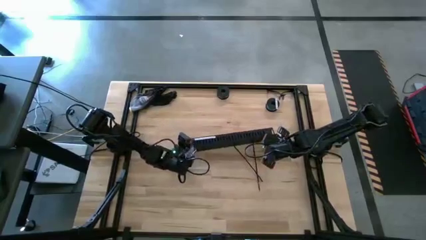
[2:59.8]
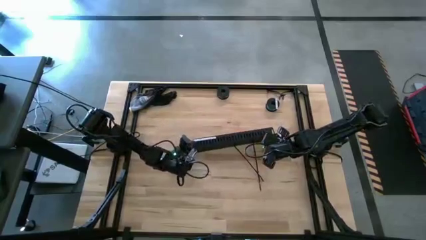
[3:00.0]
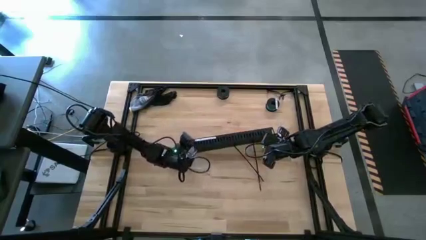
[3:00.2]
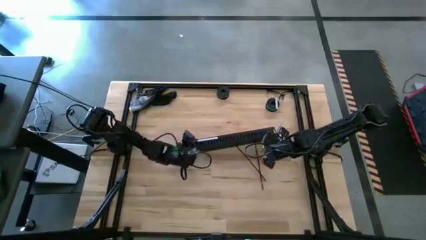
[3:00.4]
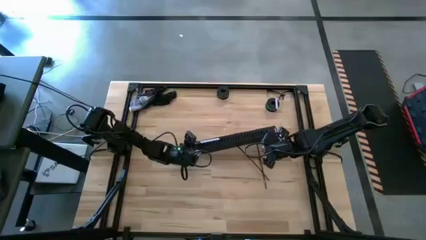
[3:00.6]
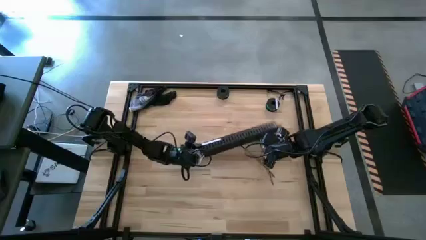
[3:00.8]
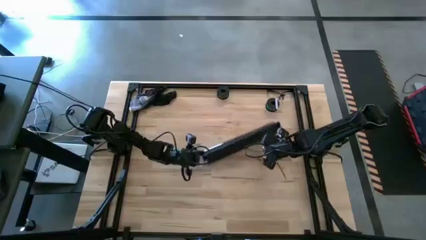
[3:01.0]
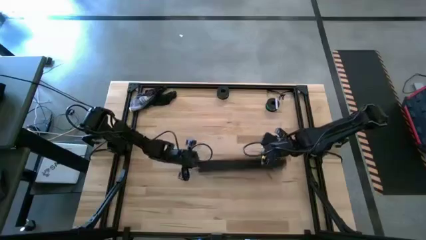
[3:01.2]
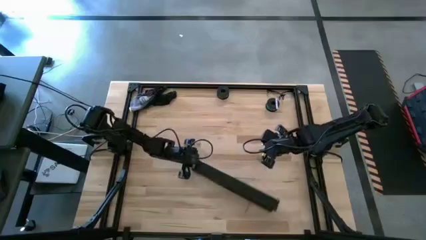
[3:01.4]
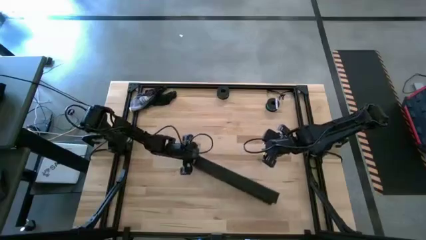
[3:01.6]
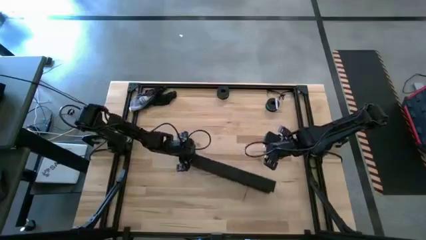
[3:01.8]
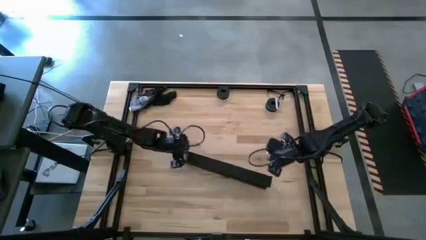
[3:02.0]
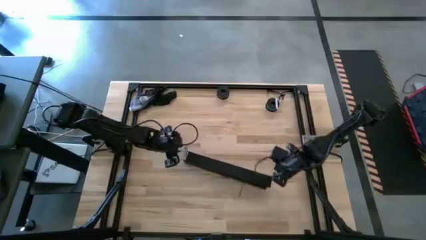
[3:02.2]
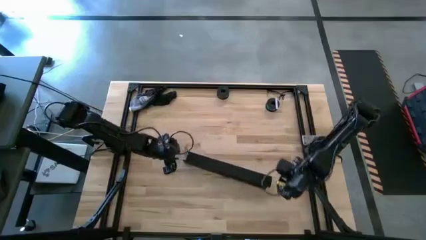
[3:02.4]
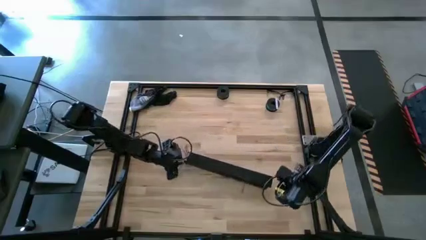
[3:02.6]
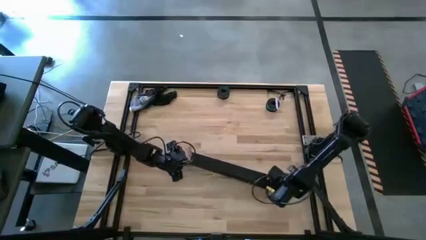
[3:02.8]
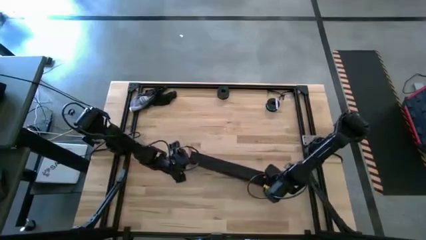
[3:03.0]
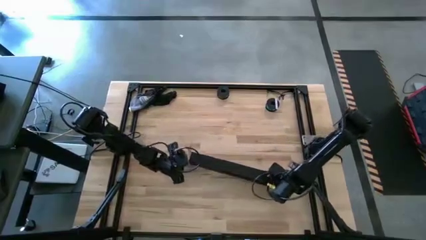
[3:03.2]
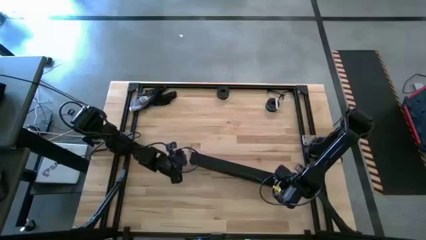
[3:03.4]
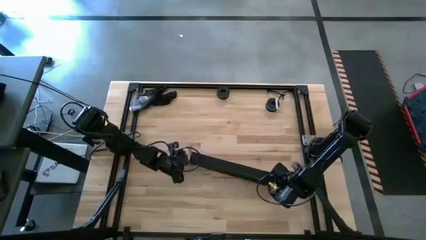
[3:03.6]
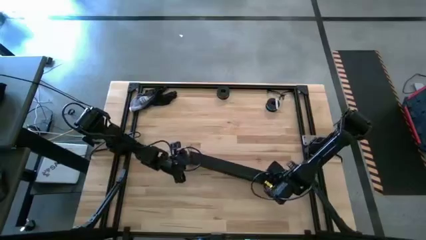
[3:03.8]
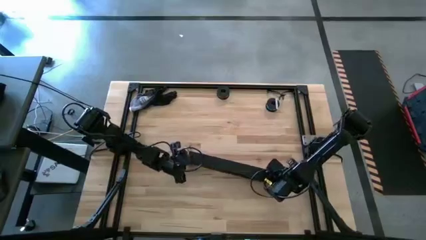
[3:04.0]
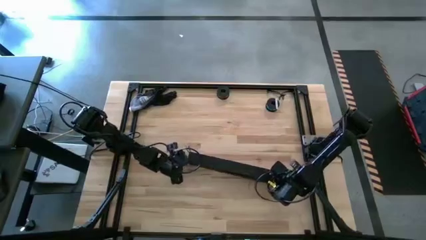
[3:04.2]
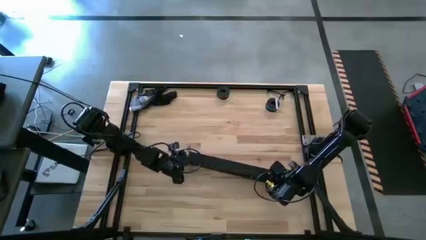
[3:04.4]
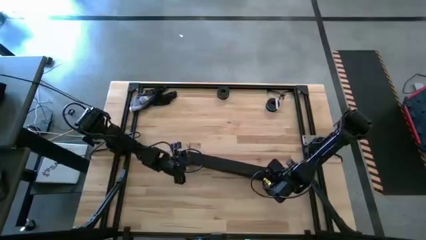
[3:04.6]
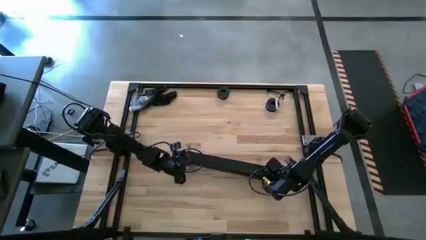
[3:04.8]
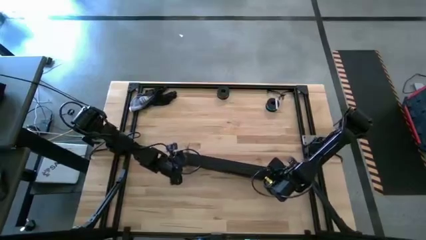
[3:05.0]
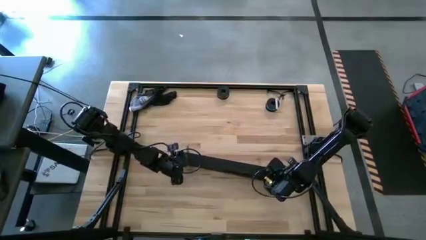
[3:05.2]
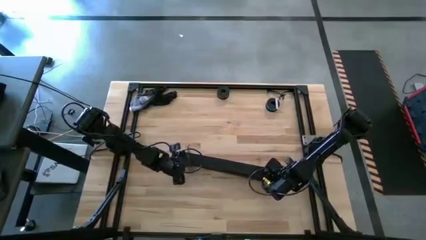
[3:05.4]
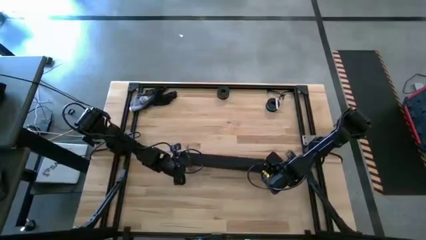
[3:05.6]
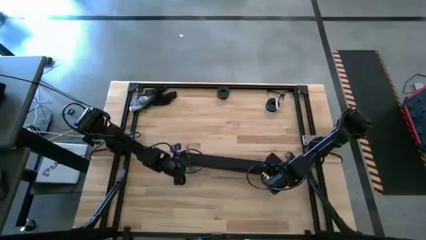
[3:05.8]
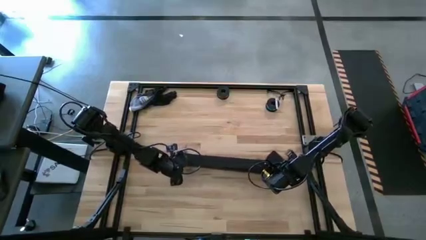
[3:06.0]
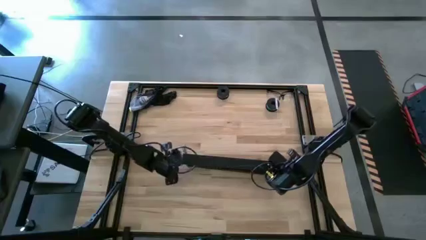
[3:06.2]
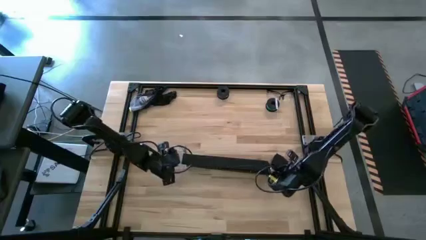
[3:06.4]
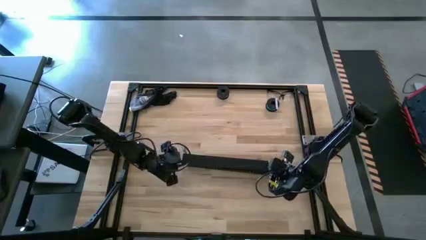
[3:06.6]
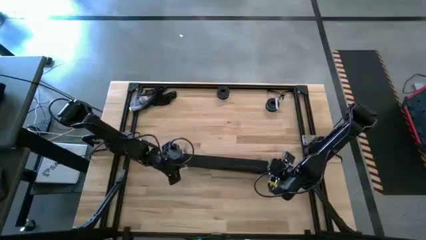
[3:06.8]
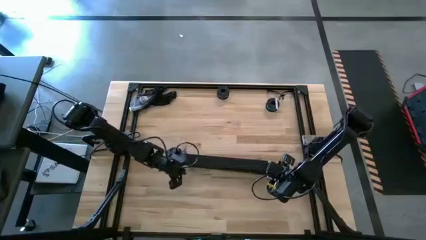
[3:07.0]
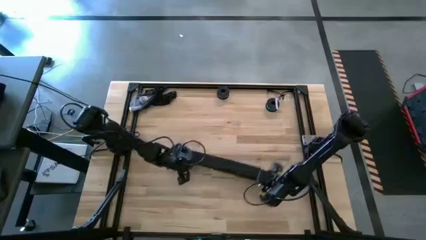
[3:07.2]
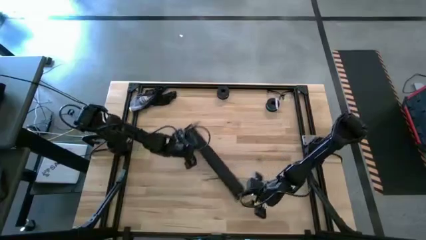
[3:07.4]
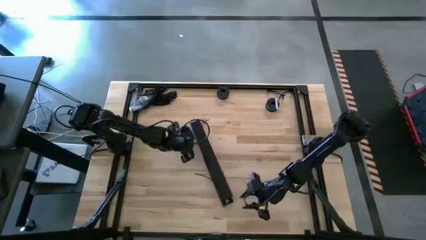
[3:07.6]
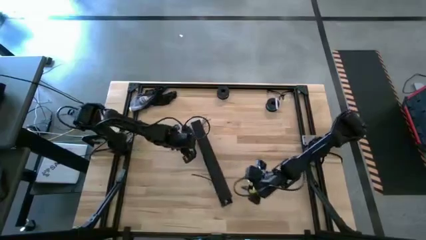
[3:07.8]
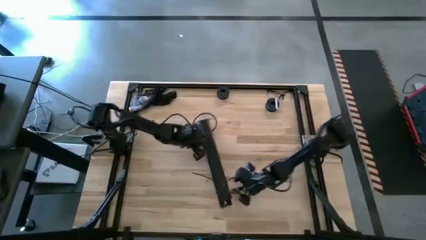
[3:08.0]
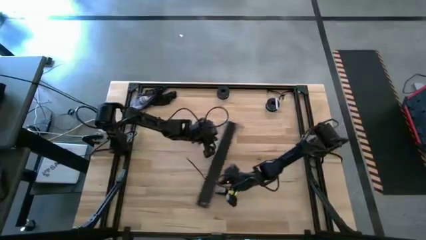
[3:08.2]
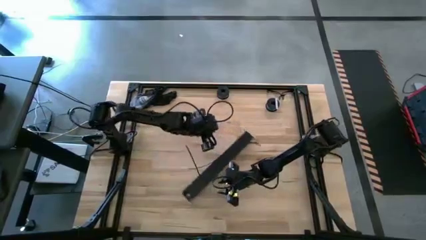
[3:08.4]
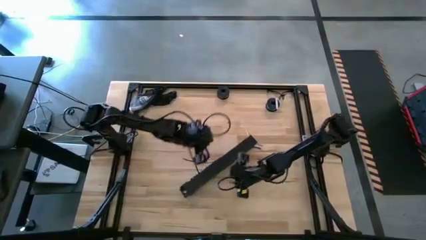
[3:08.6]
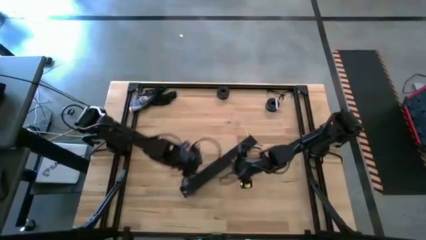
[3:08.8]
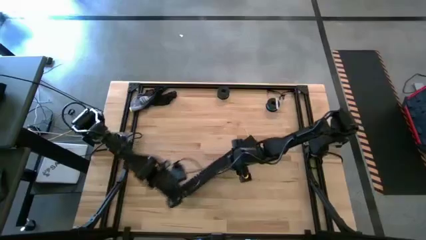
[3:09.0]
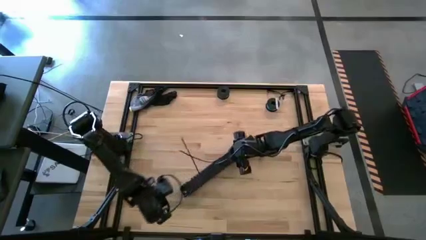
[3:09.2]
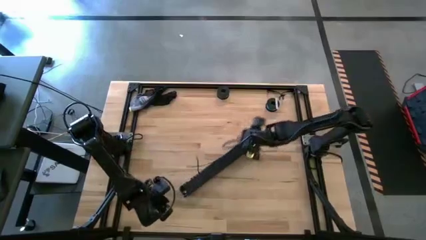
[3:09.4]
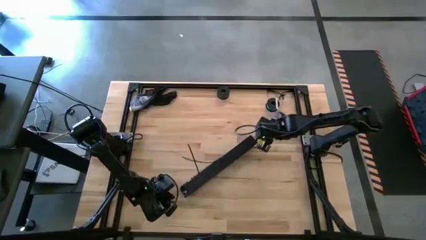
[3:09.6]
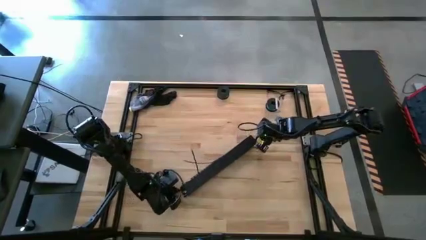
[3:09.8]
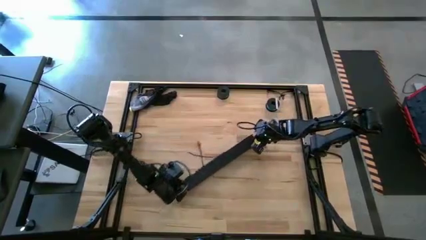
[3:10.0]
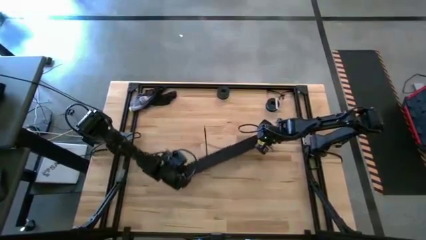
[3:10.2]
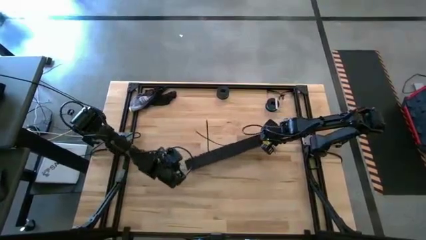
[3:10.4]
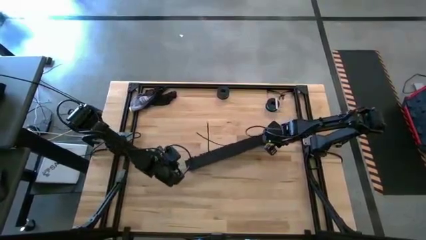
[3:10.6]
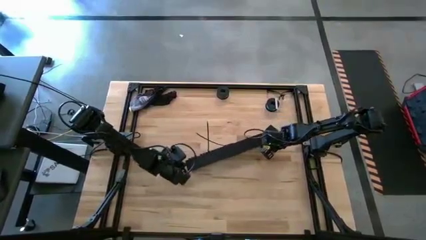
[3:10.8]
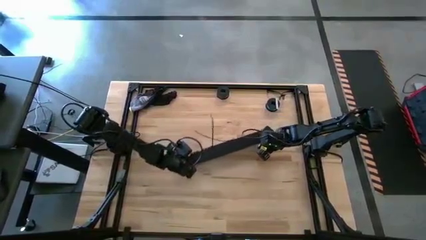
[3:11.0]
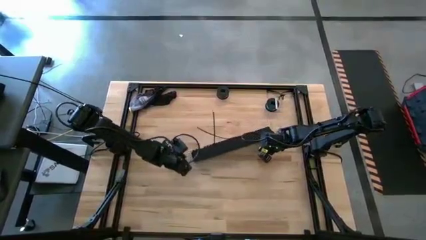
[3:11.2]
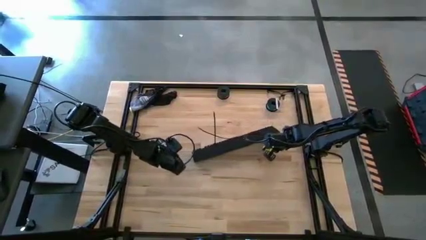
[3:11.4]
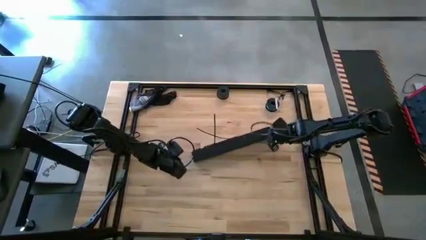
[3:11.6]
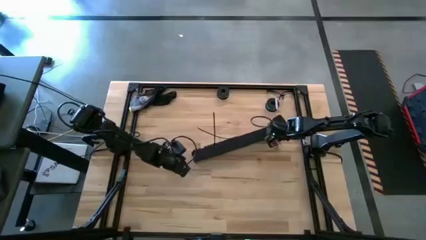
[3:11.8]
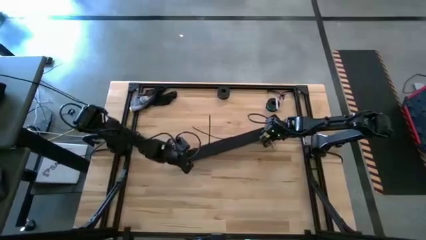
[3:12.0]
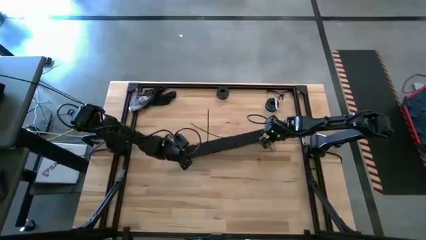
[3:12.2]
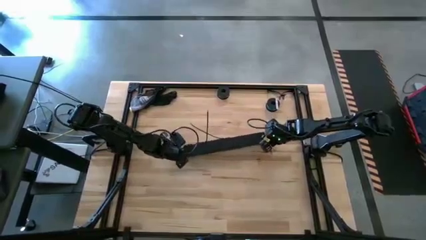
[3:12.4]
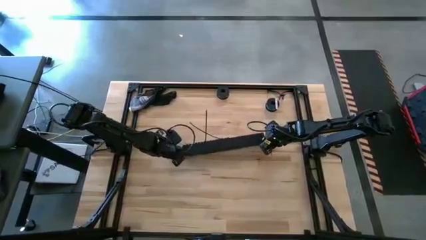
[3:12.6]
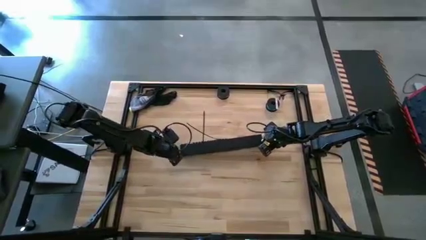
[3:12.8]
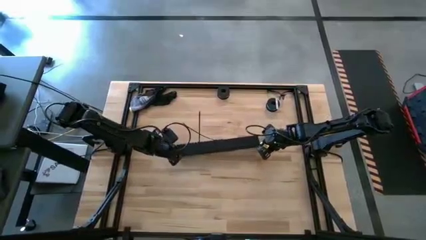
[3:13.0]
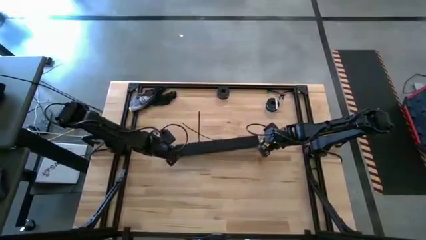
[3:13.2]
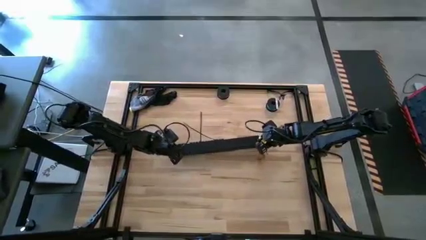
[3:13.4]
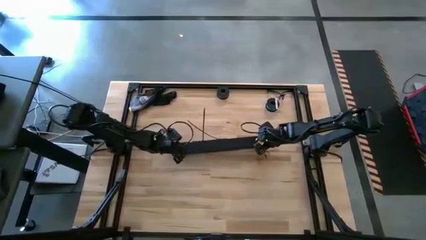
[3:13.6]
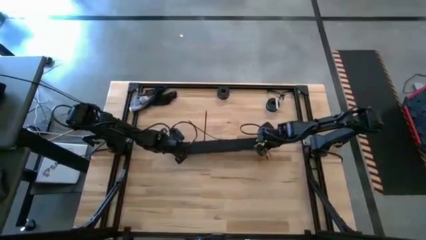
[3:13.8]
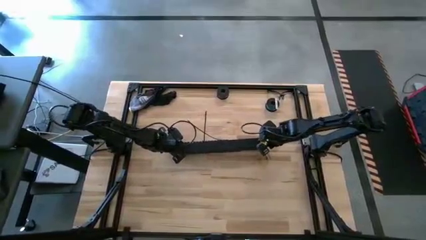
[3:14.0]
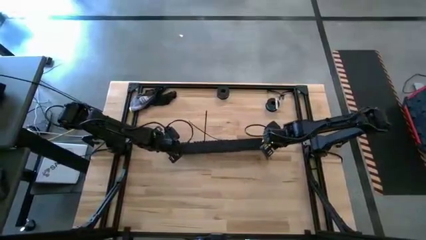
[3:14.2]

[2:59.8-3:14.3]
Task: Ziptie cables
Close the black cable duct
